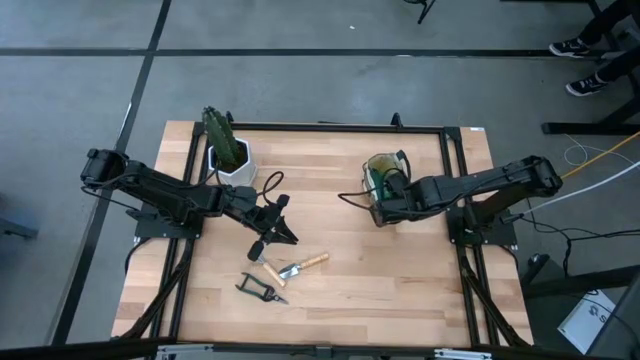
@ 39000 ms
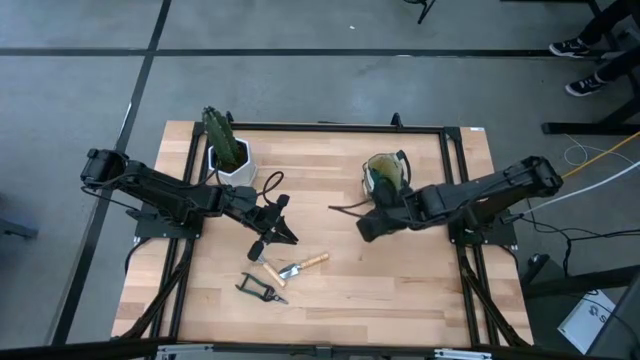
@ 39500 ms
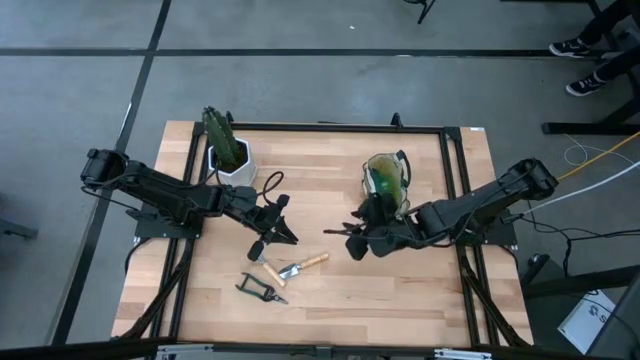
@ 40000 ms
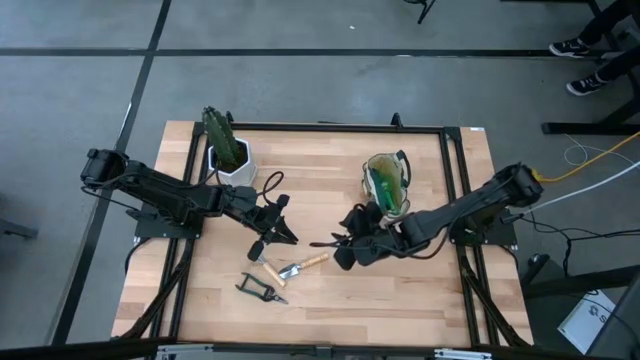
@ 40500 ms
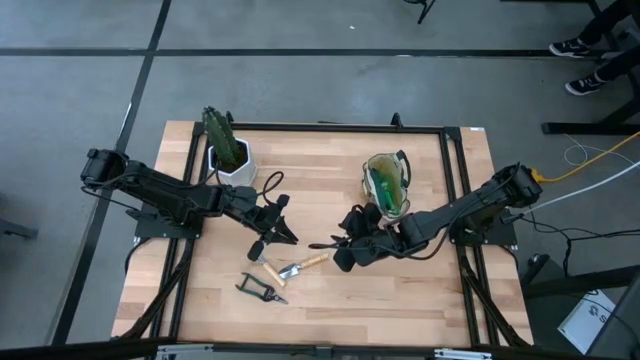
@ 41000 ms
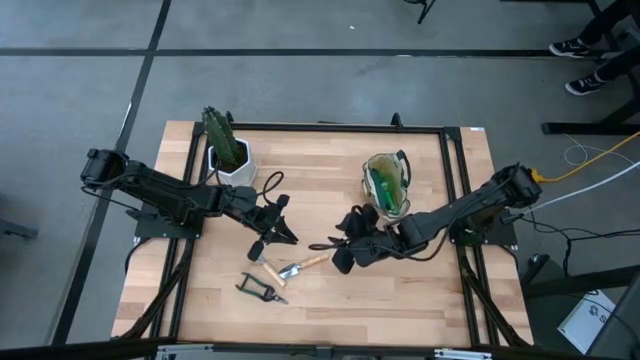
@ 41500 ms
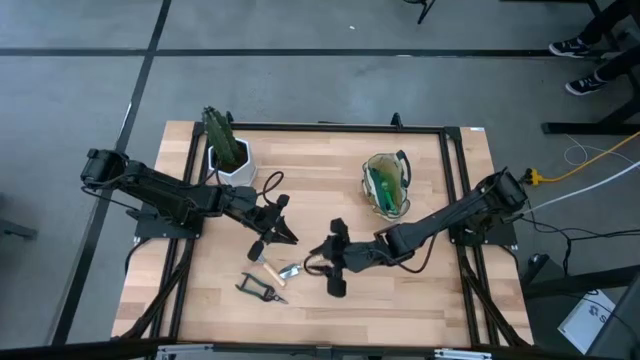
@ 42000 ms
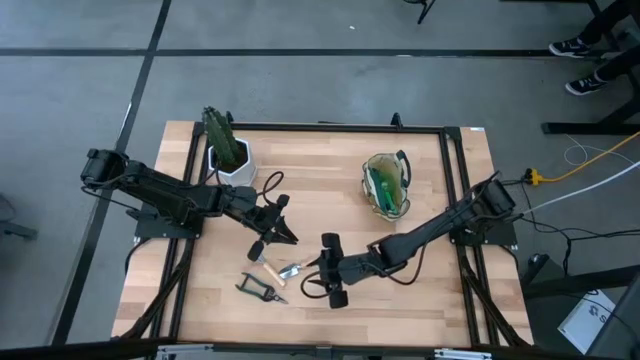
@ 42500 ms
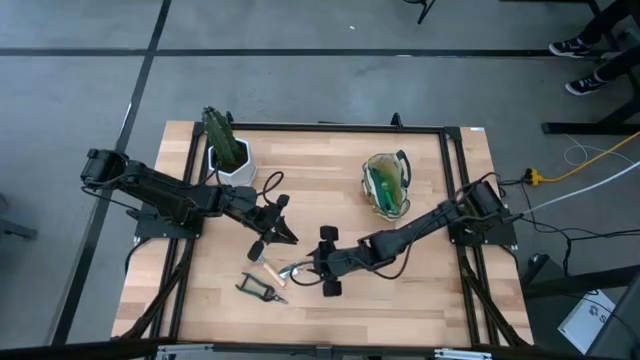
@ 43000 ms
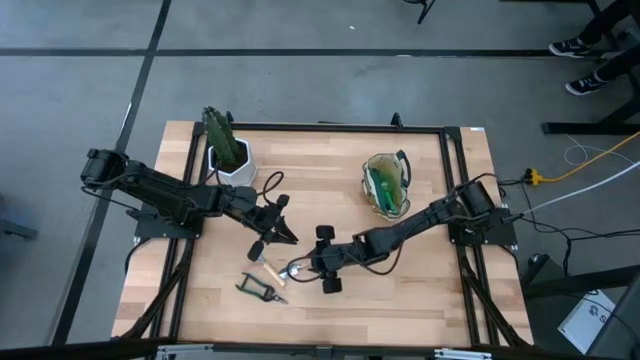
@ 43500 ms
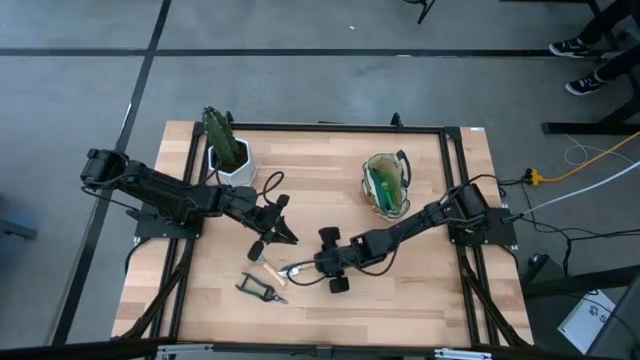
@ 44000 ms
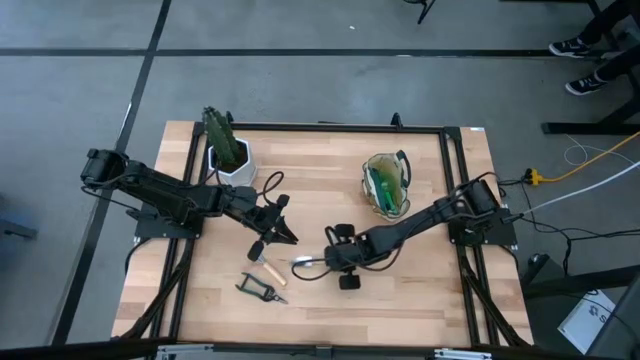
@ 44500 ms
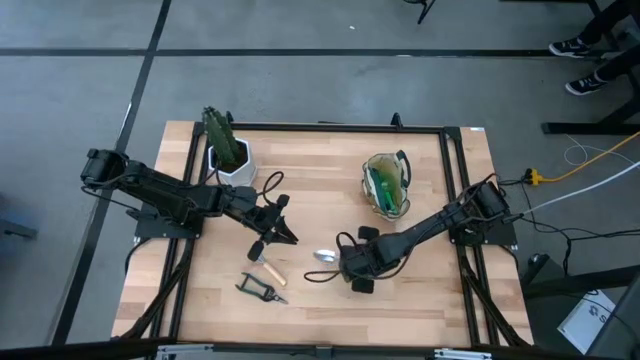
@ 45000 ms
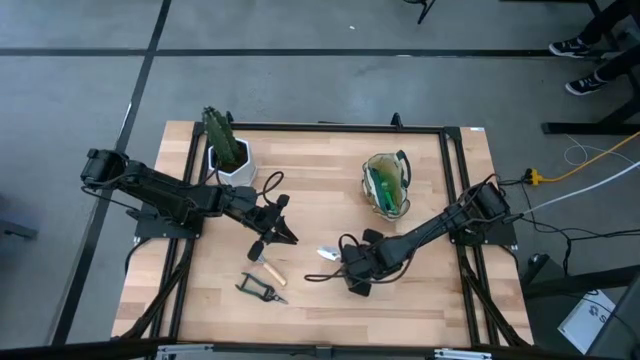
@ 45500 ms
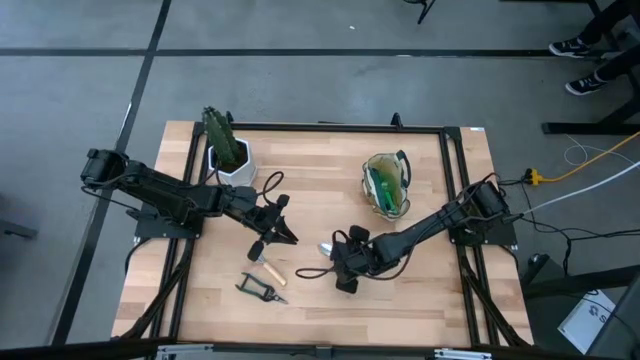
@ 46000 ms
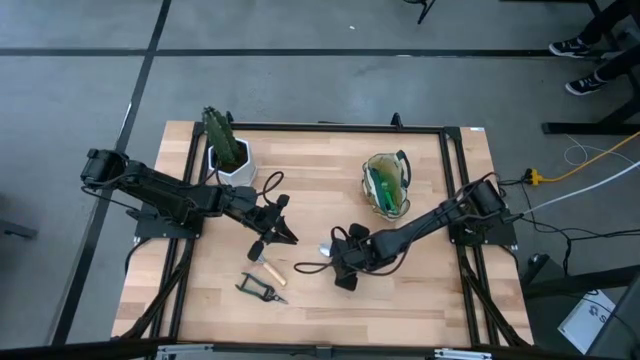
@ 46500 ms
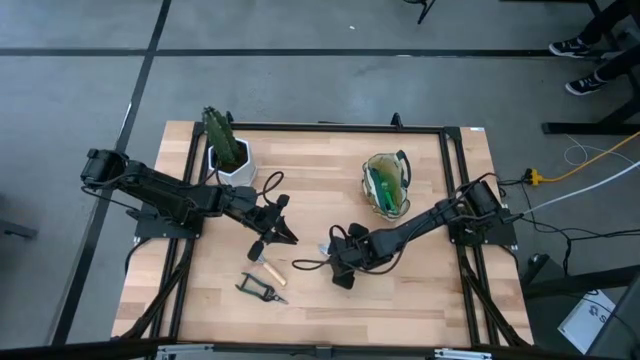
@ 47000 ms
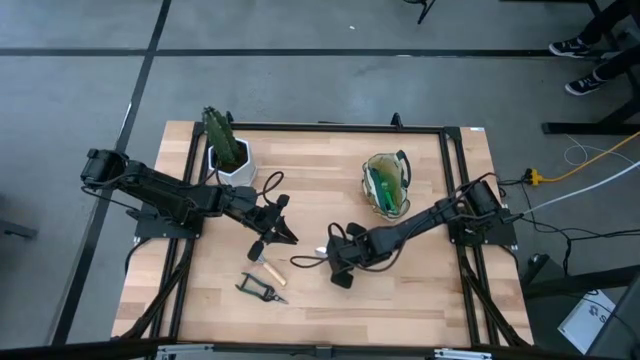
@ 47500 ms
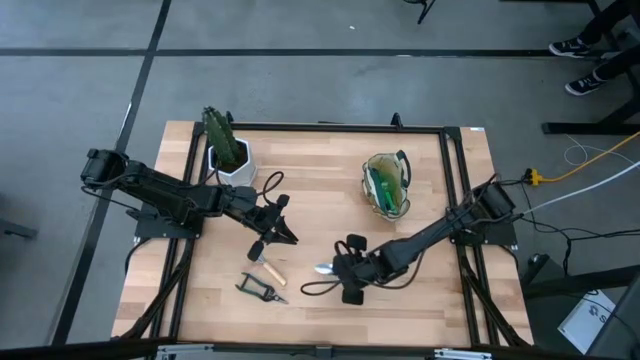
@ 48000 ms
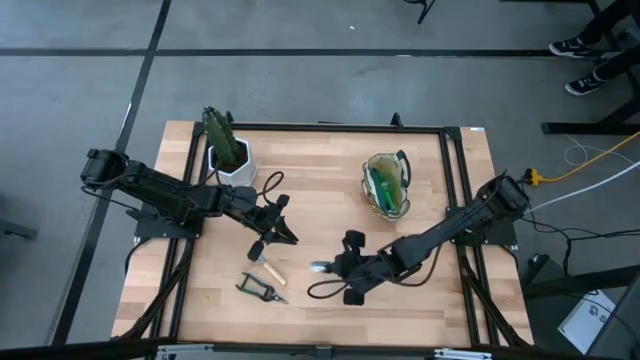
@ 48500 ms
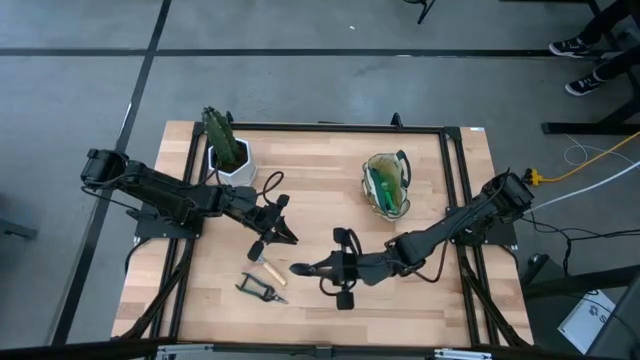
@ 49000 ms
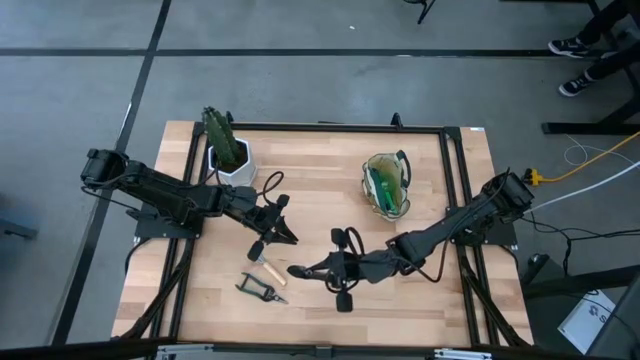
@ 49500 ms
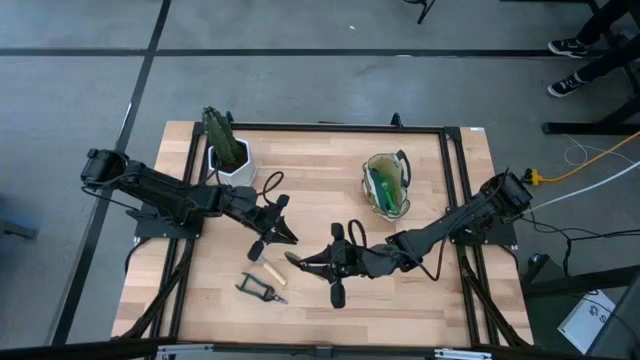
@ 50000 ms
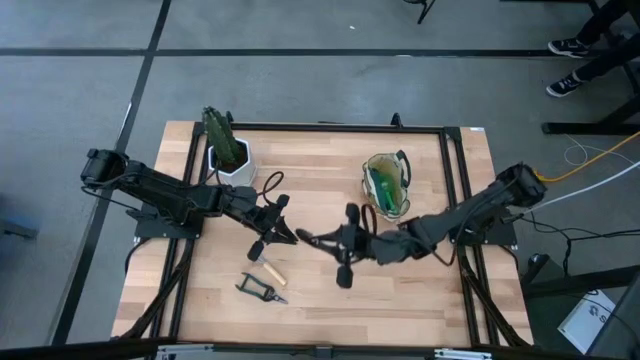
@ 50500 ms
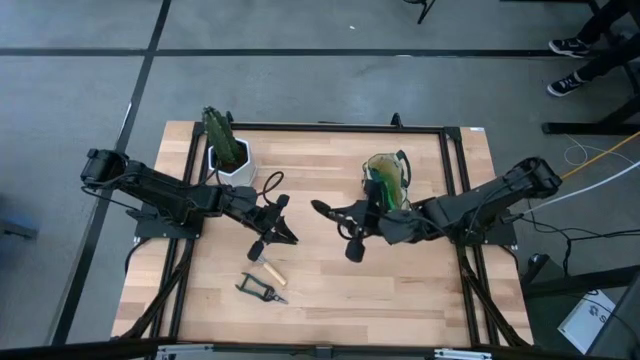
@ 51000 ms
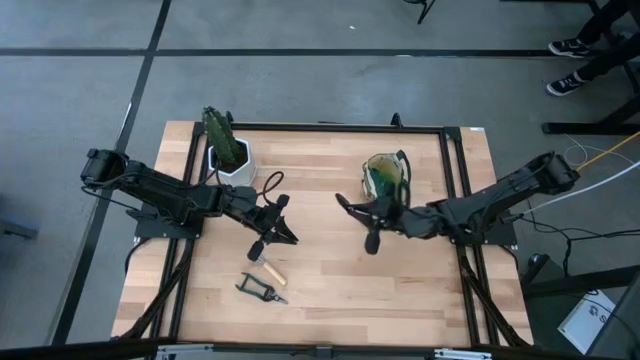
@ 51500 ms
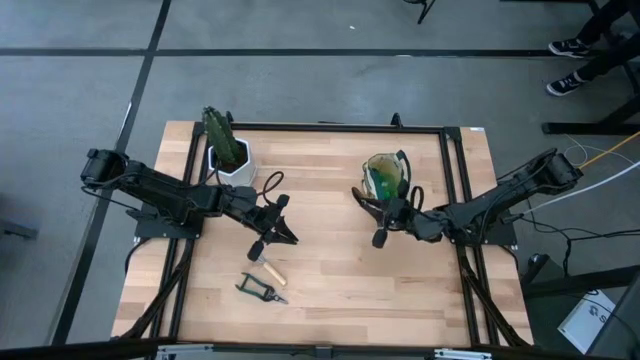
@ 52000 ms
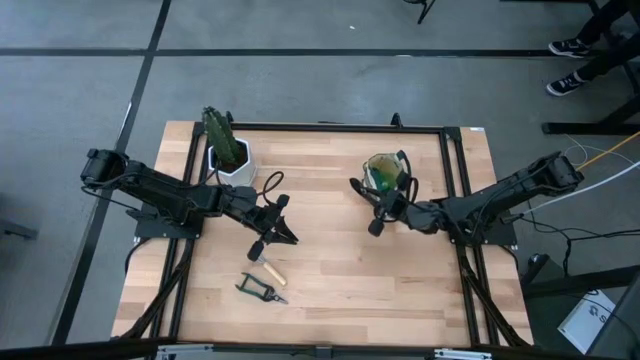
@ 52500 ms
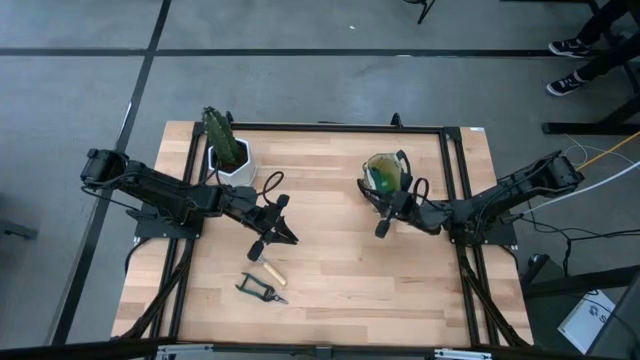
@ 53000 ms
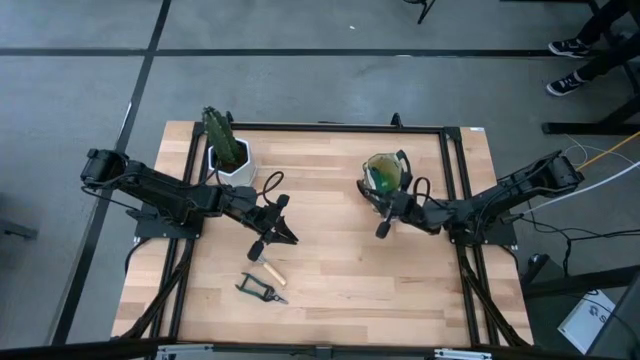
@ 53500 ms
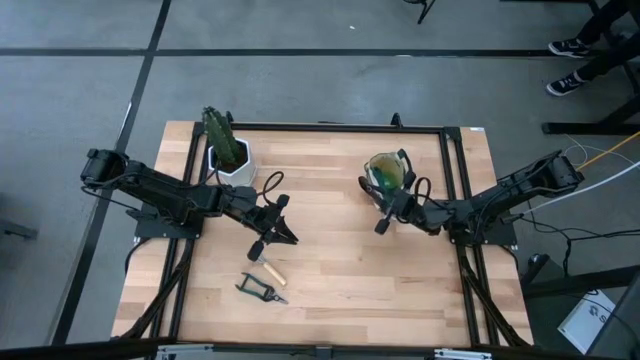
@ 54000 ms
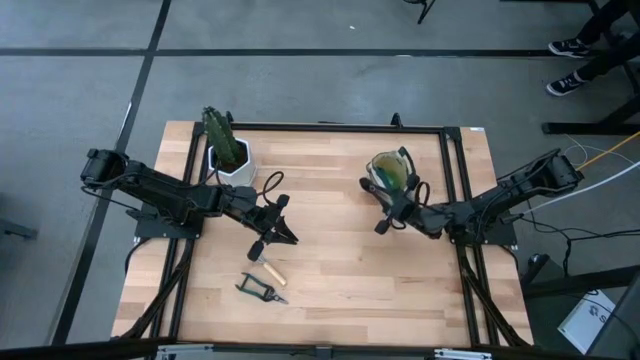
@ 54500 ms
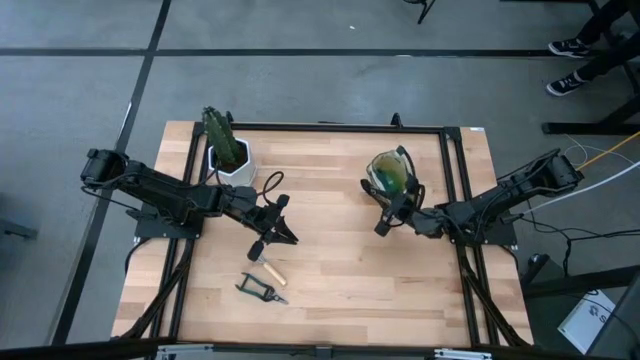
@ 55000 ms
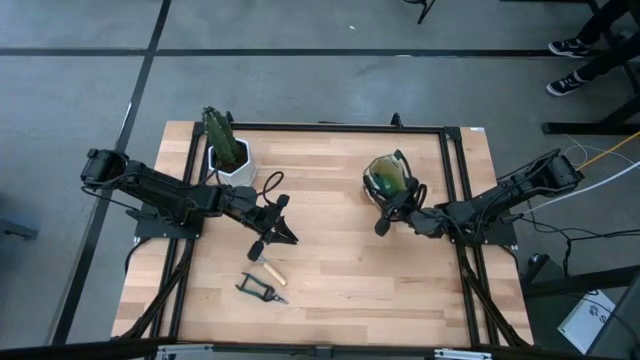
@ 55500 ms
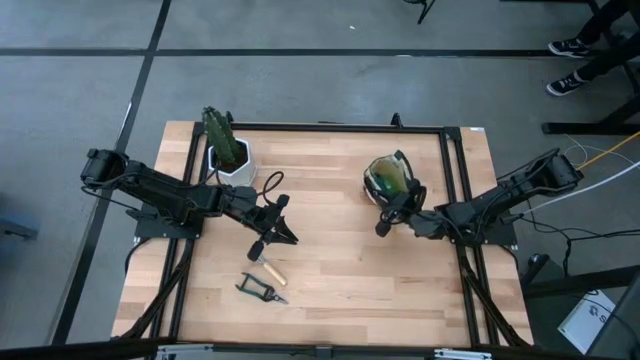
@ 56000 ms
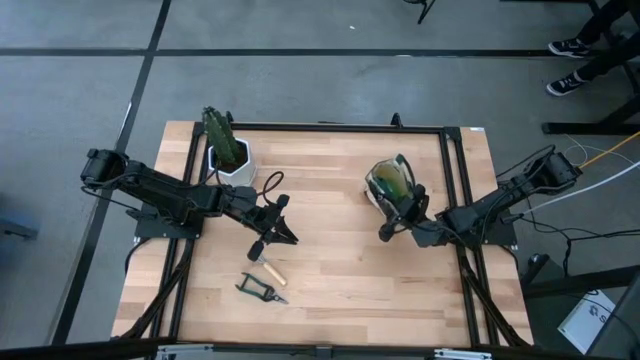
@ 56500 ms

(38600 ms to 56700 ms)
Task: Pick & Place Garden tools in Gardening bag
Put the trowel into the gardening bag

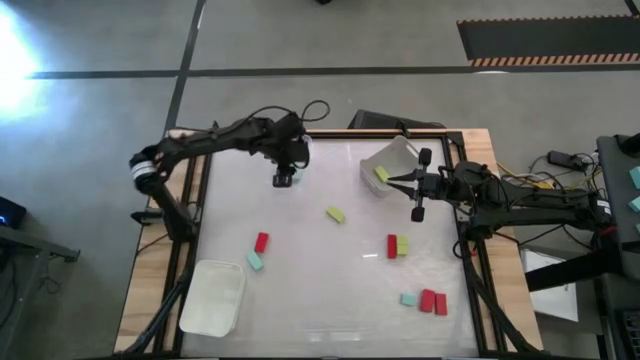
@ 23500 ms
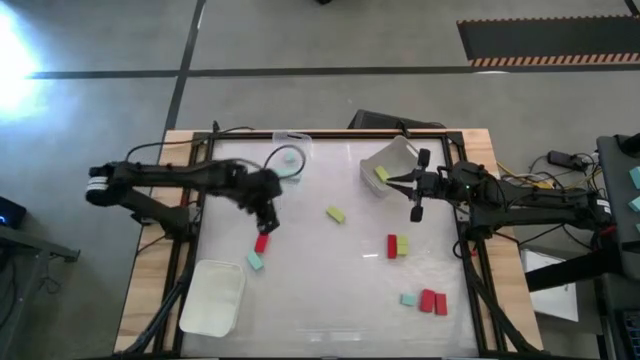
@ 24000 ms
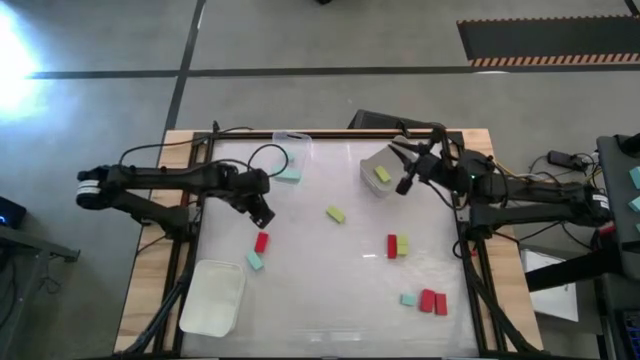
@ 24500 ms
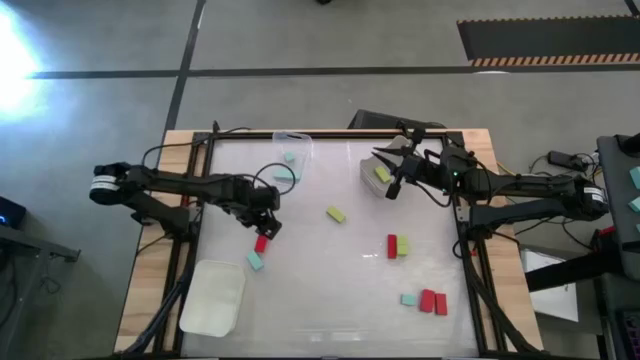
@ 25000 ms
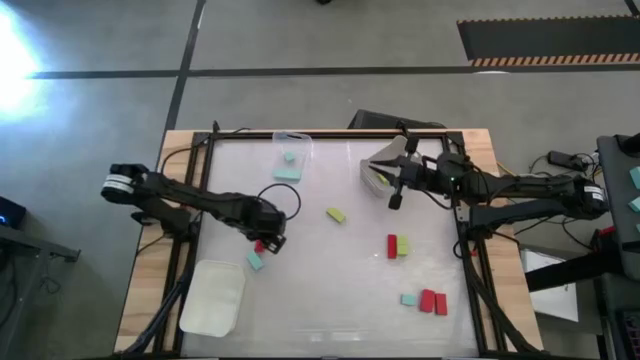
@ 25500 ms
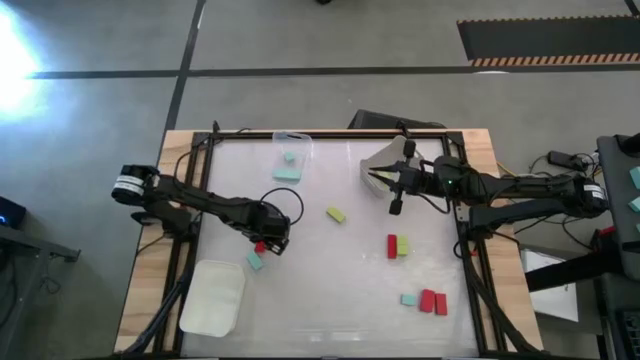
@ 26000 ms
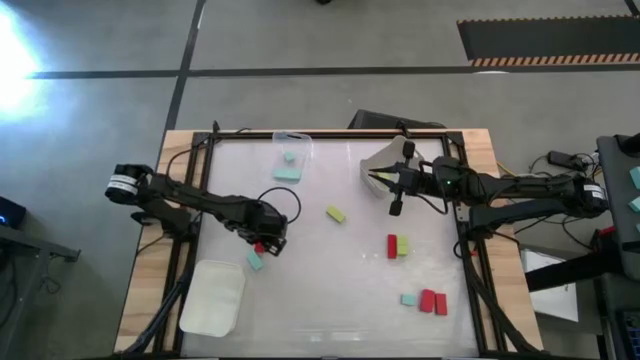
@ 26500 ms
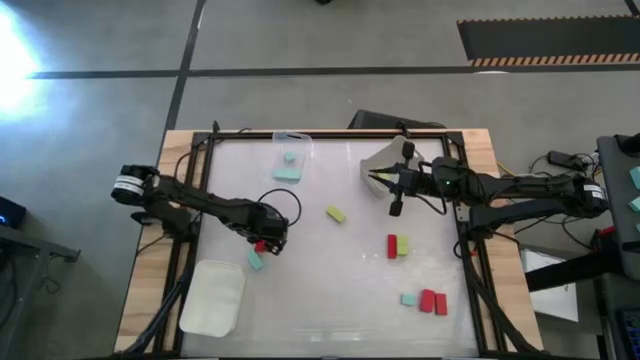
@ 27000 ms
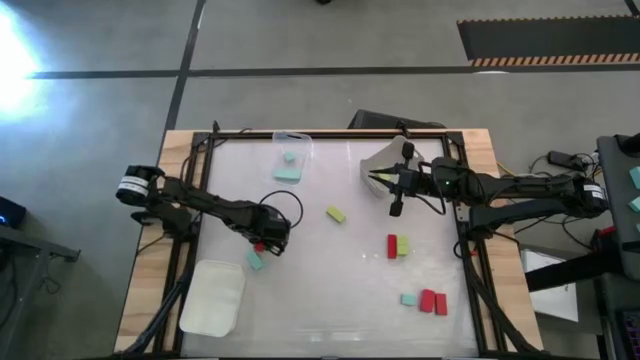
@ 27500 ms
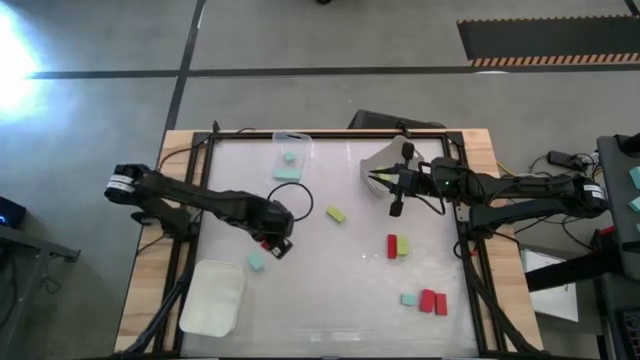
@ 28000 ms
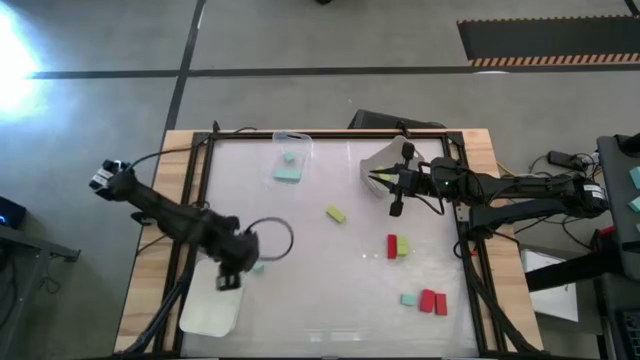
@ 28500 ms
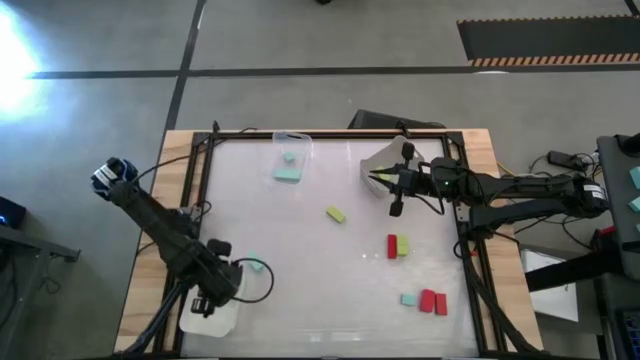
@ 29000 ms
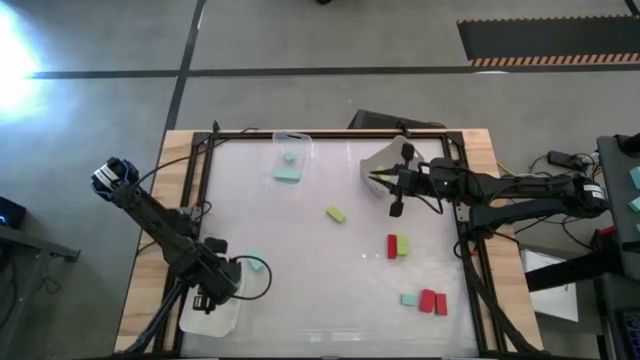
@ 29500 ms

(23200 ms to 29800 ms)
Task: Sort & place blocks by color
Put the red block into the white bin
